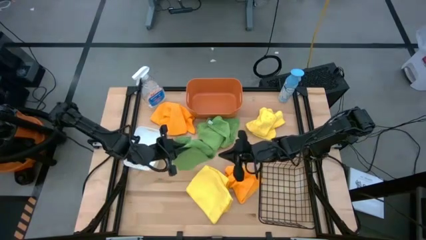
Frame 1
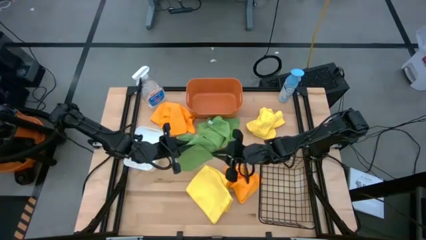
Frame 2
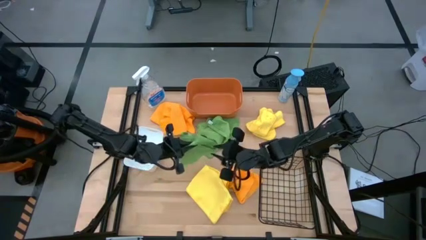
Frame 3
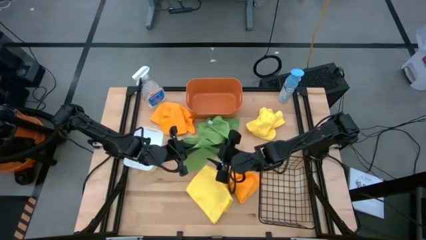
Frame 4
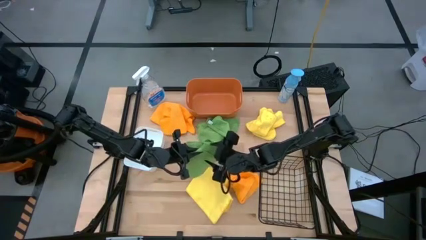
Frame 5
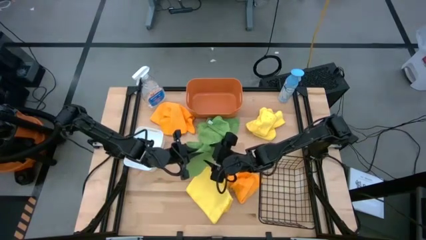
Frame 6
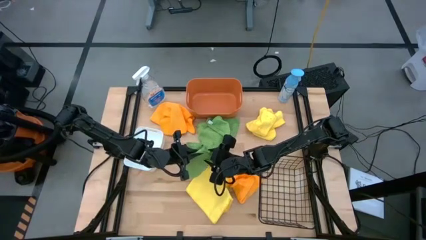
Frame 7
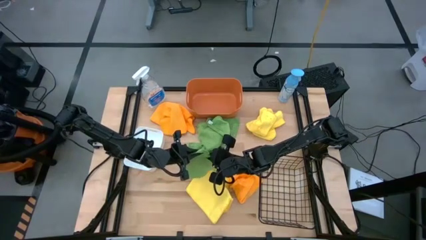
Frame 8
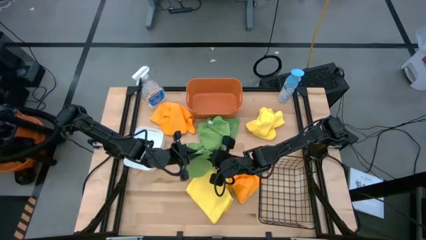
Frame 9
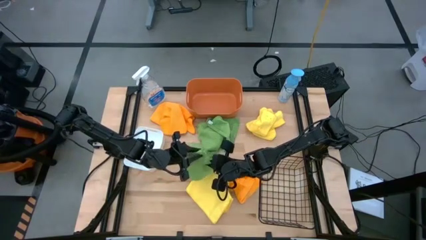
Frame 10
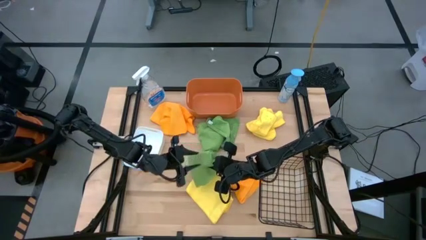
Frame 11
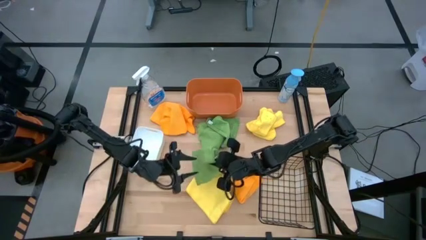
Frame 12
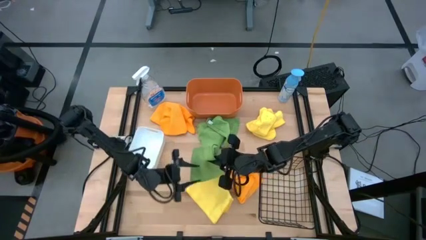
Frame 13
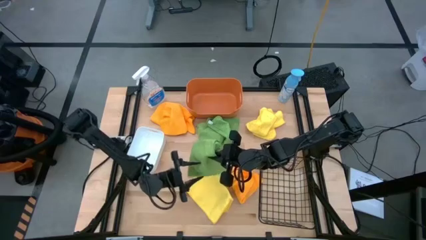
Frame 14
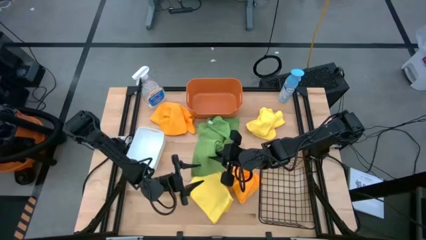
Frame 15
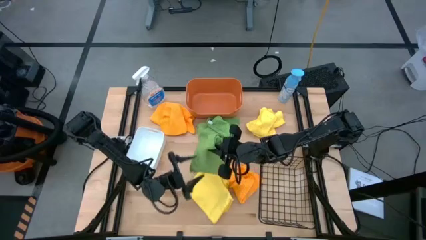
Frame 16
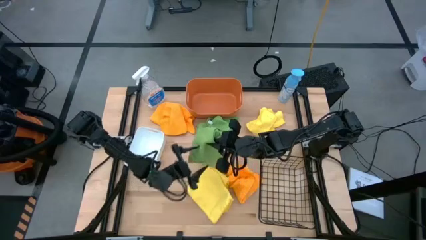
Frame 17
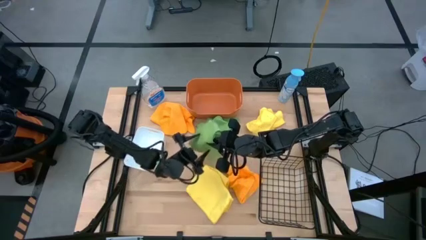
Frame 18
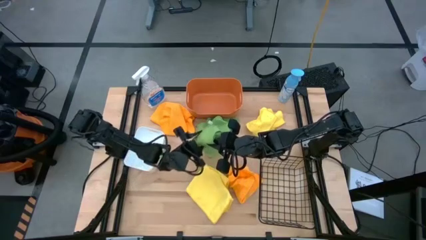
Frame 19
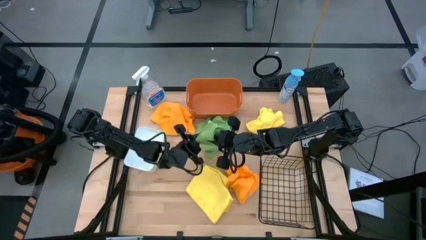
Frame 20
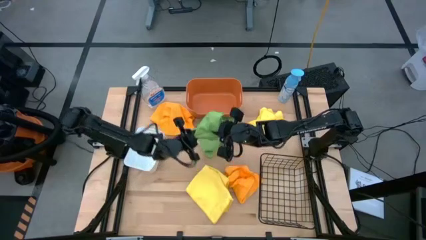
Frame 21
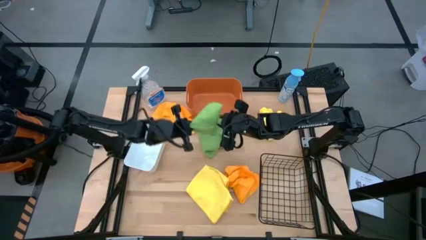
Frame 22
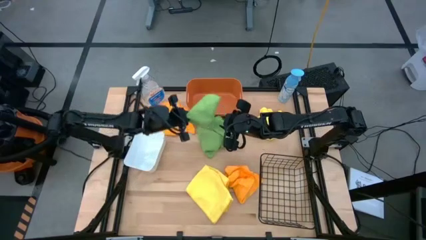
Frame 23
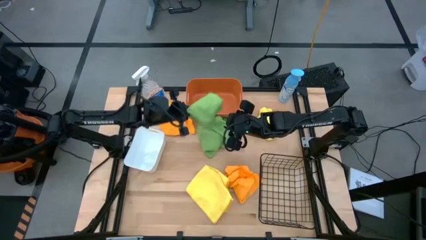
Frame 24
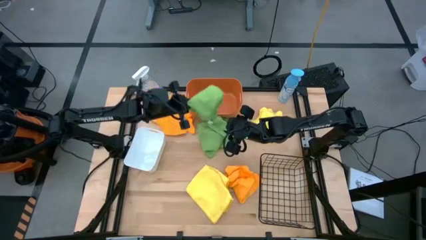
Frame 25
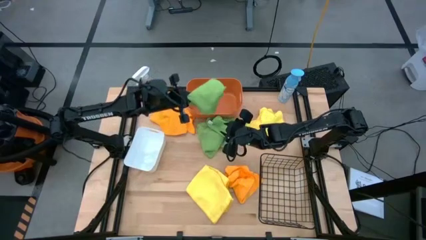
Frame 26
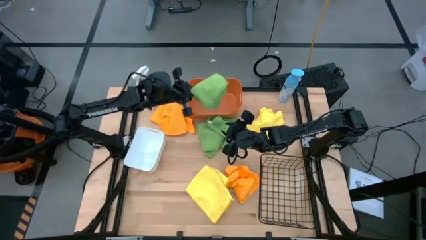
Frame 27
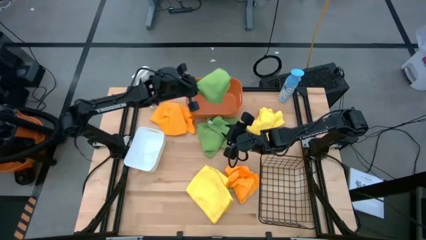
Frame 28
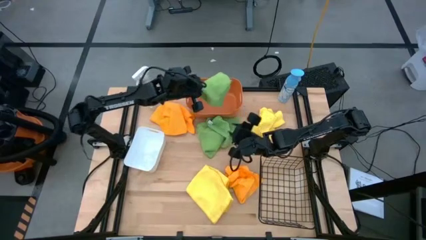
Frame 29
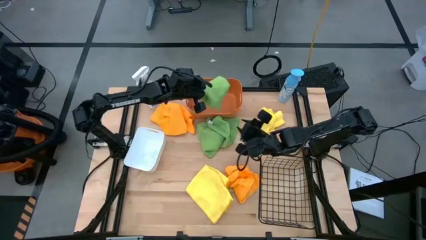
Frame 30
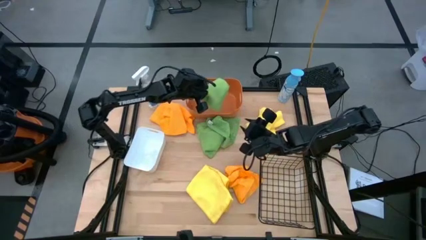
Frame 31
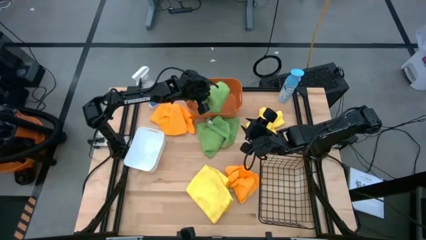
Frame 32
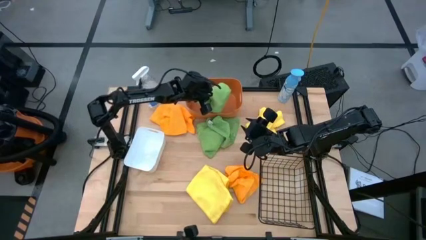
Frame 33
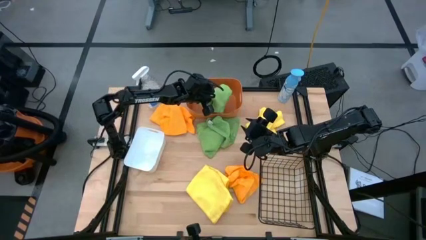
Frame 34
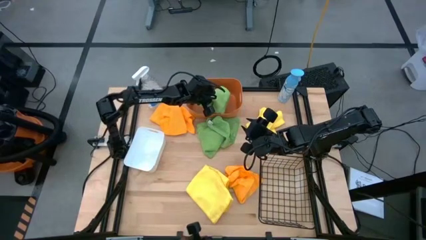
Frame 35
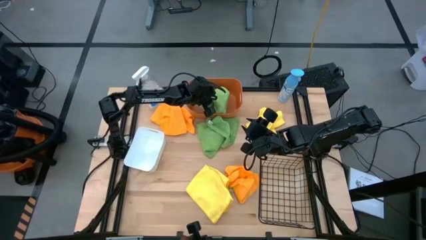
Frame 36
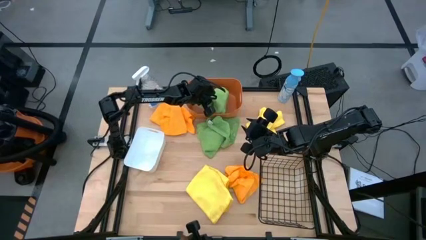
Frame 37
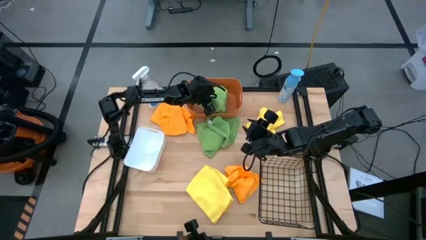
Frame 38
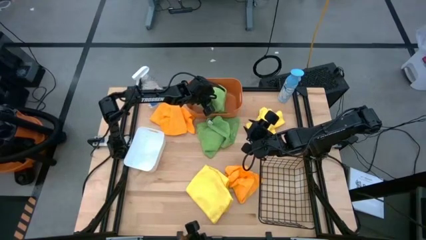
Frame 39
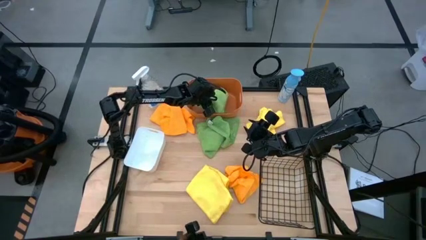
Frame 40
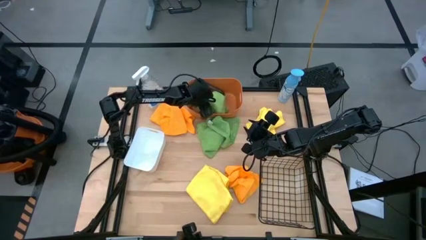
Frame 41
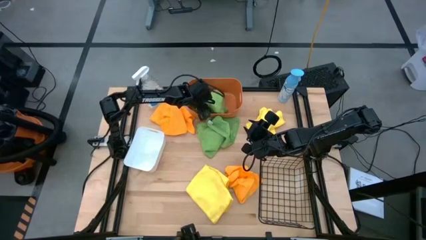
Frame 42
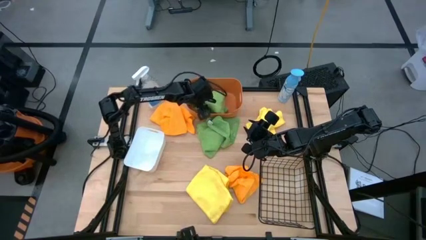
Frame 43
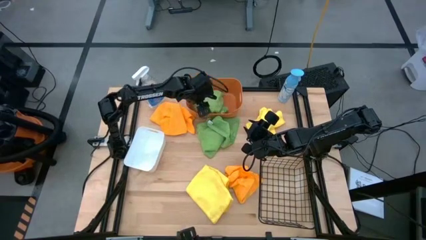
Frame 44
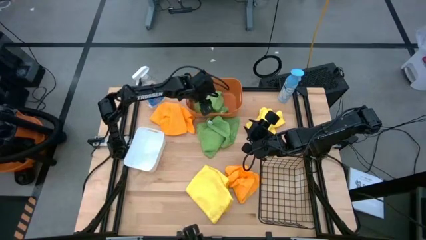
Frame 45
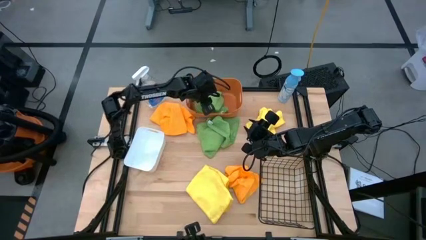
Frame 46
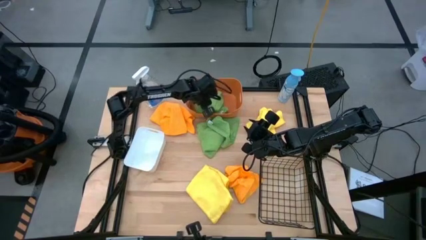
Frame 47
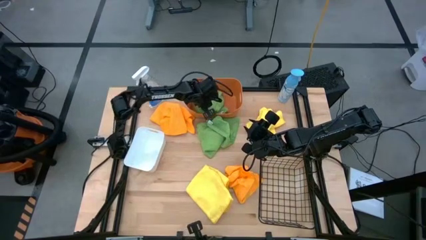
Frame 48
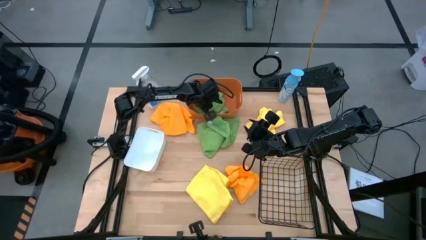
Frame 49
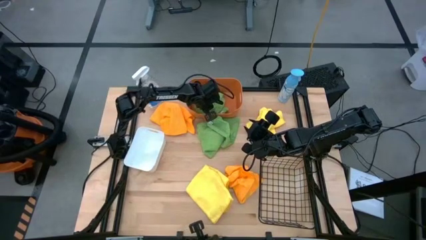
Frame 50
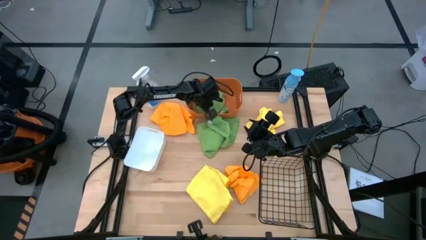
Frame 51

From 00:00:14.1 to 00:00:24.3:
Task: Sort microfiber towel by color & place in baskets
Put the bottom green microfiber cloth into the orange bin

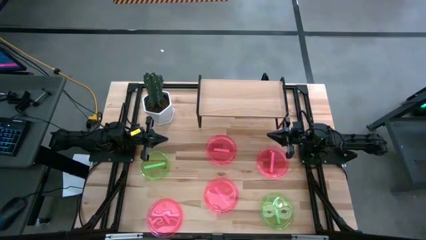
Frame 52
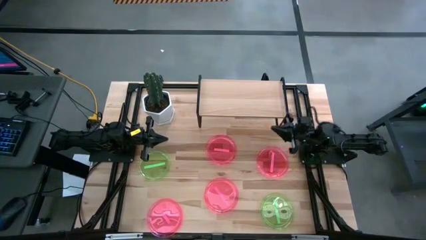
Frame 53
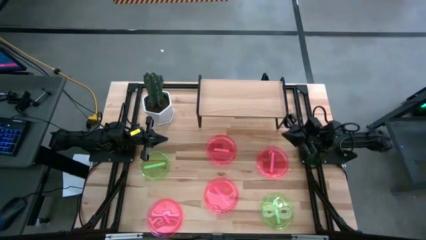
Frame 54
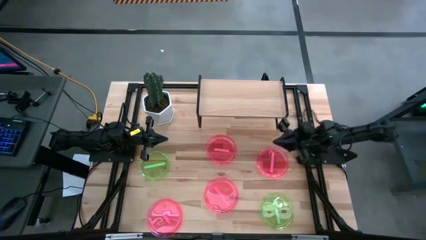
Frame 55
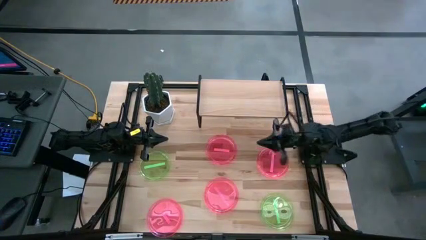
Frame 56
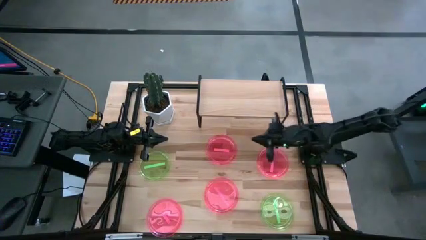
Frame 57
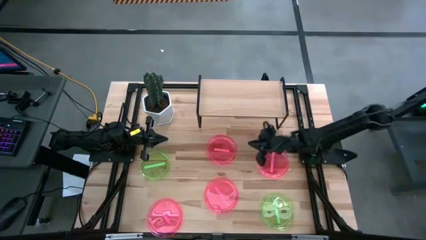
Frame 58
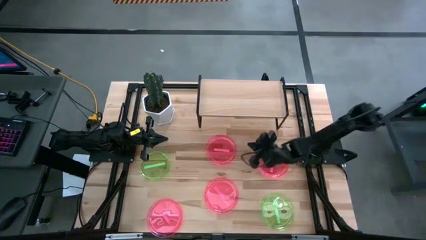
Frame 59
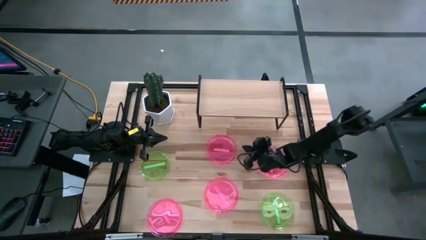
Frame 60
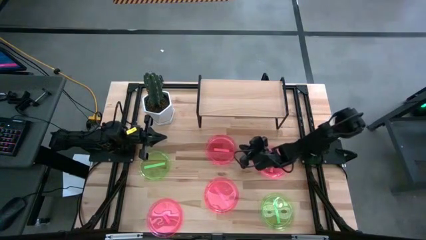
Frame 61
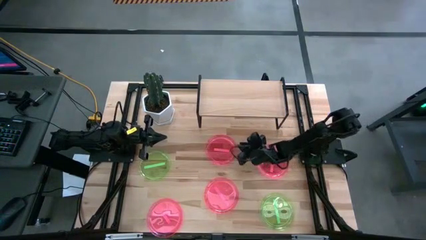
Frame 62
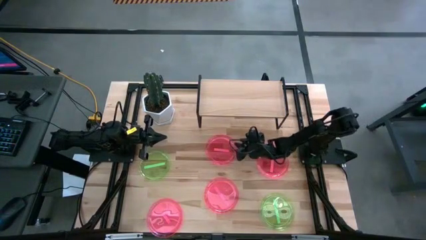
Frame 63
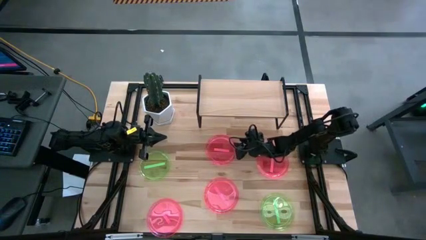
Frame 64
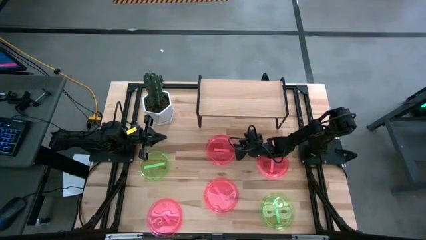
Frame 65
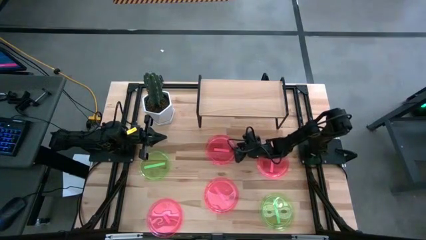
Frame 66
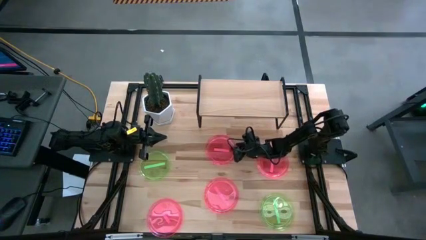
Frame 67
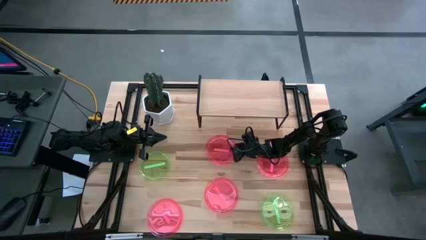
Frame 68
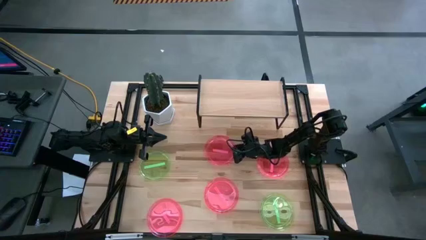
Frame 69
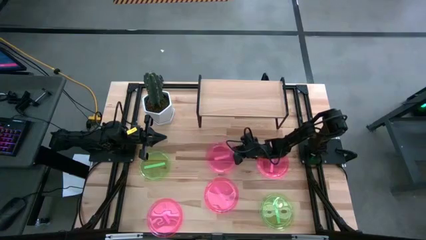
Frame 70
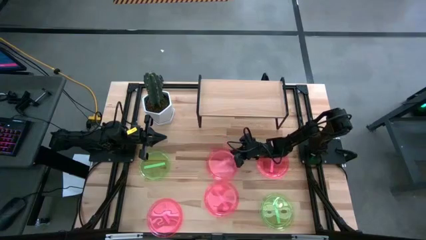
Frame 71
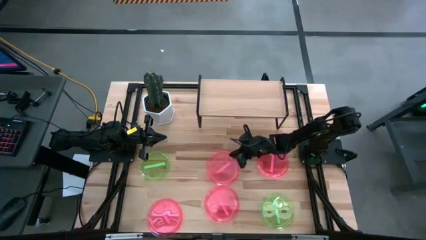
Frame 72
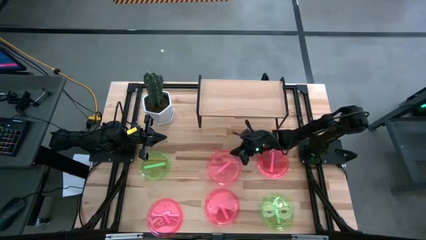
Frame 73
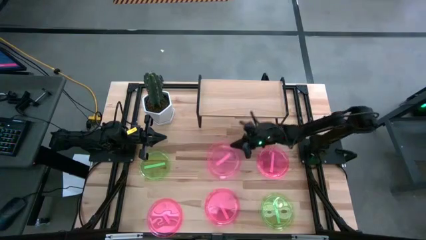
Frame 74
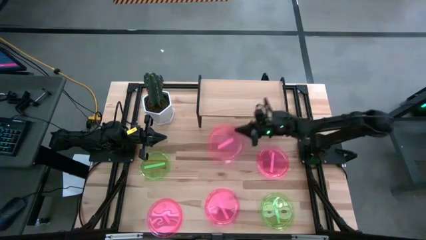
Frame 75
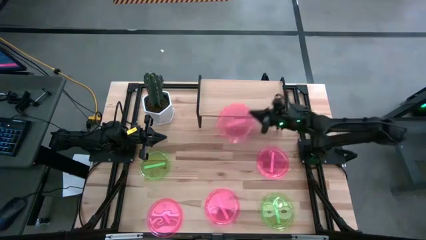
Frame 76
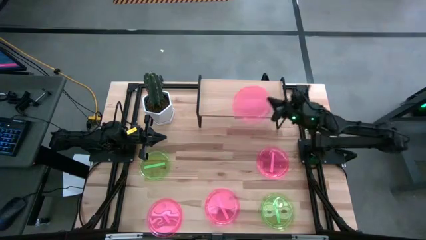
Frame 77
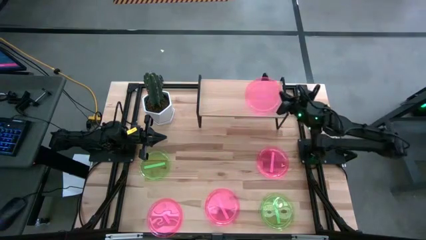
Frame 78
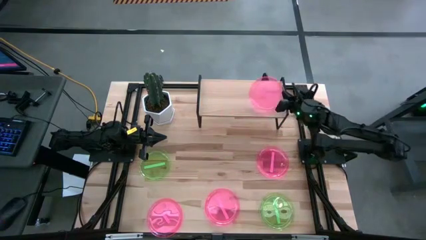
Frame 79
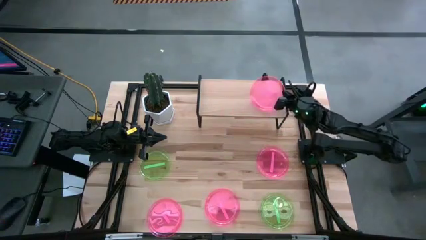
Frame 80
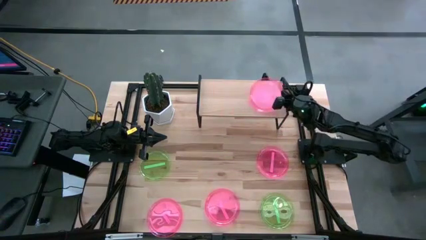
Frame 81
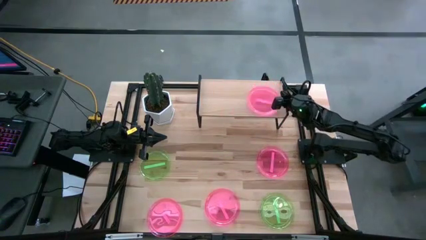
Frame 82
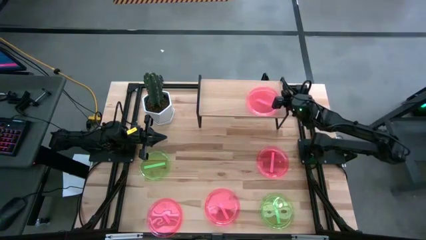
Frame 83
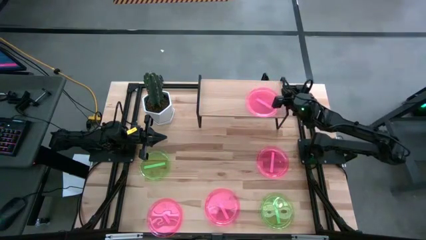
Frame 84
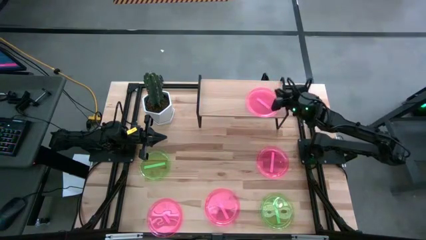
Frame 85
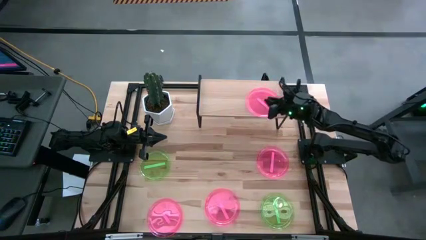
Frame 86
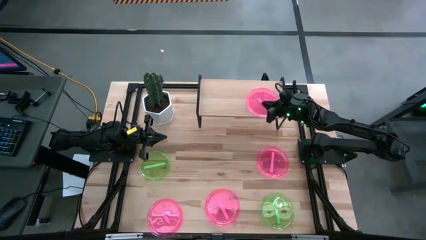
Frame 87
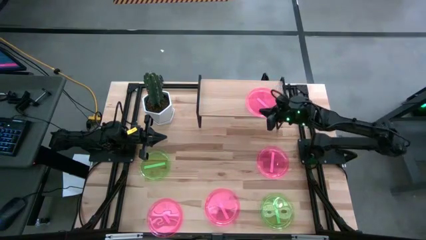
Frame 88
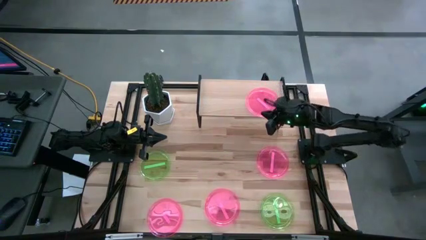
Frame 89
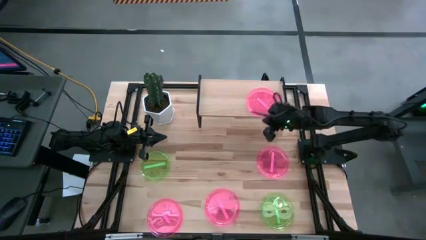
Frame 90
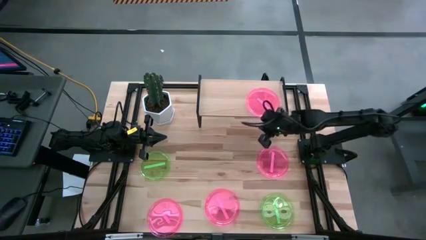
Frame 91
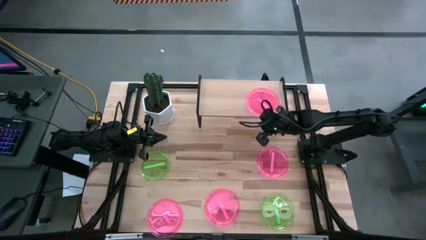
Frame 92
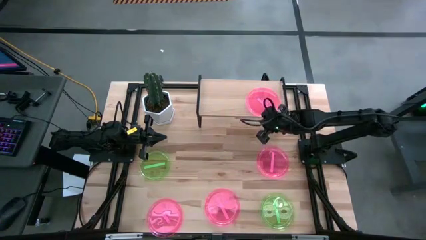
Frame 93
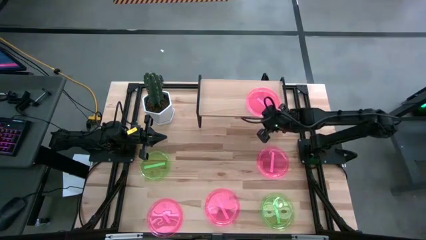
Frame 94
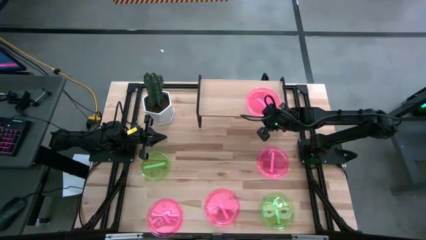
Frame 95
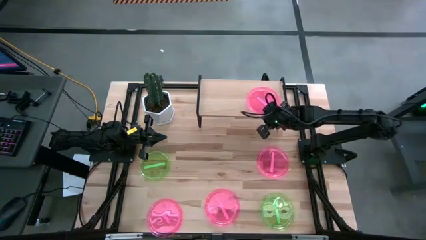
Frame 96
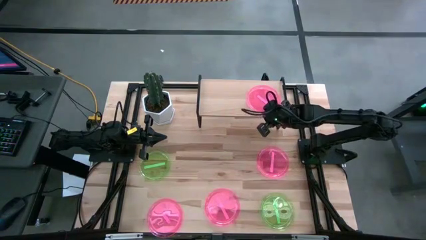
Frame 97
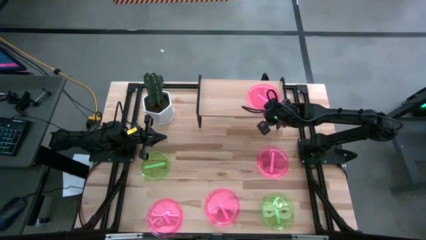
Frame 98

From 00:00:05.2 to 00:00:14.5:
Task: Place and stack plates onto a shelf
Put the pink plate on the shelf
